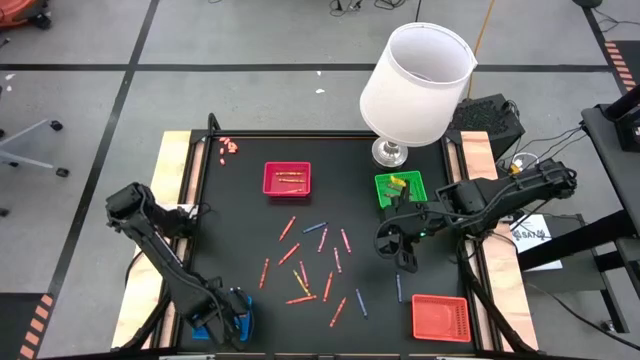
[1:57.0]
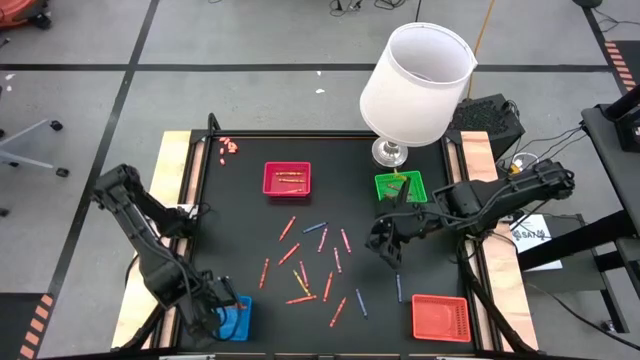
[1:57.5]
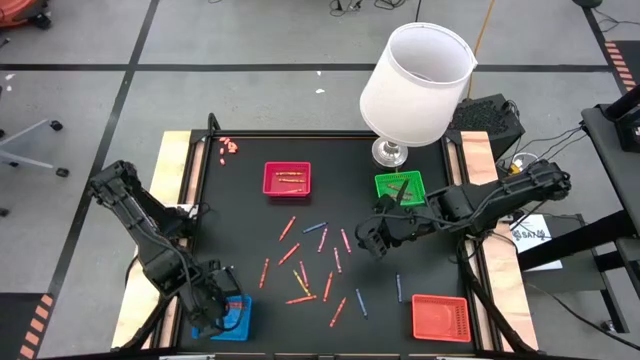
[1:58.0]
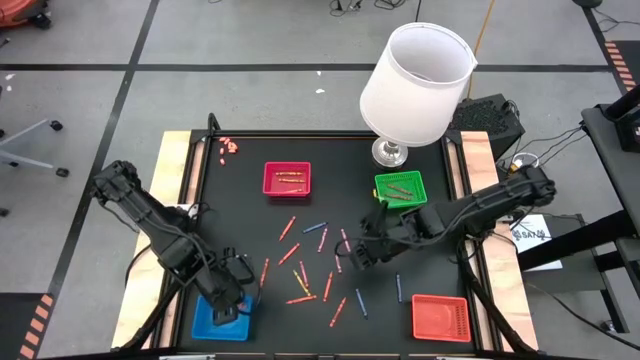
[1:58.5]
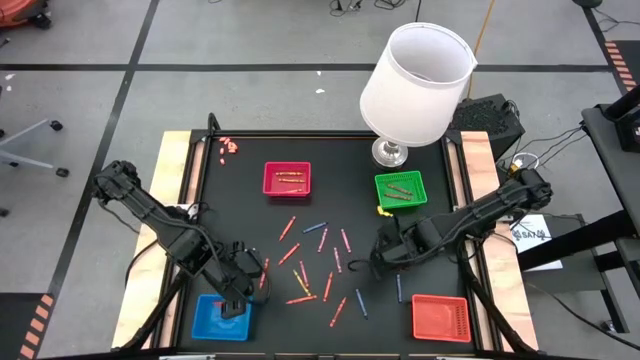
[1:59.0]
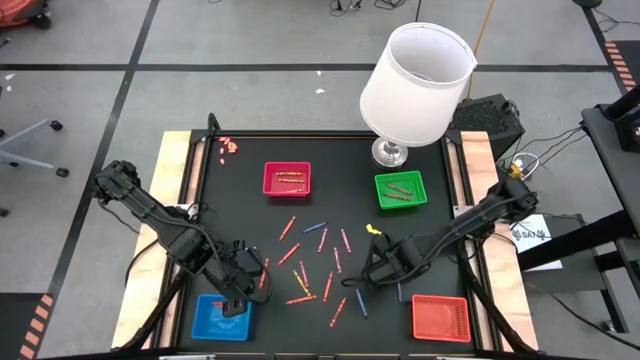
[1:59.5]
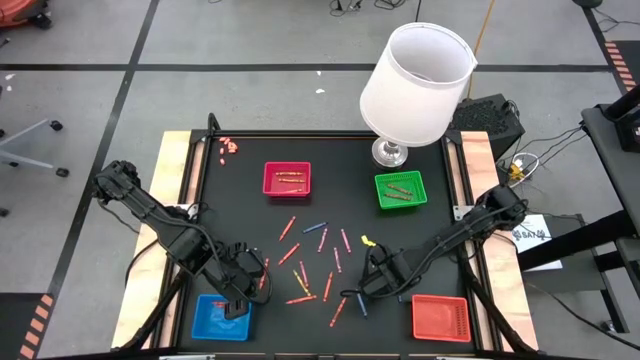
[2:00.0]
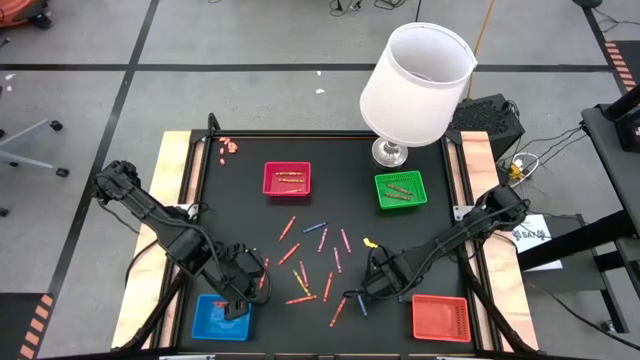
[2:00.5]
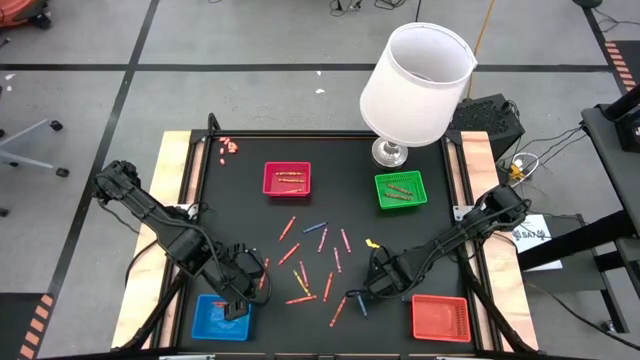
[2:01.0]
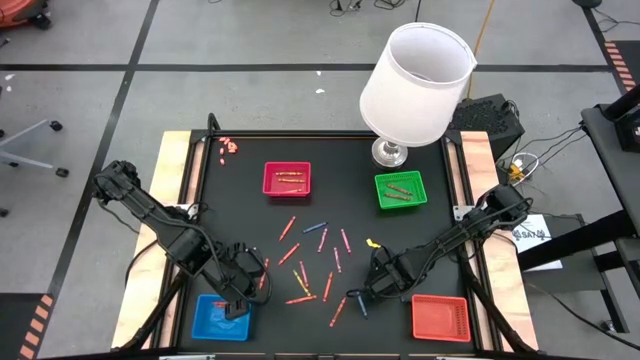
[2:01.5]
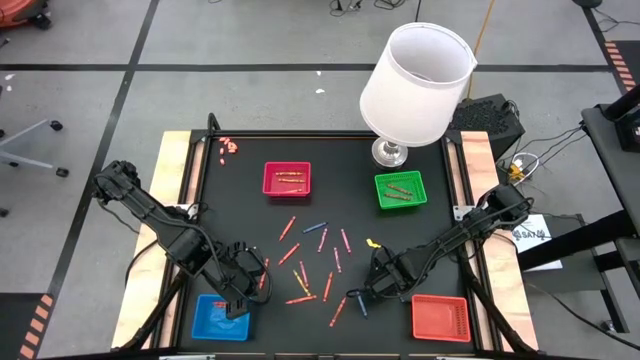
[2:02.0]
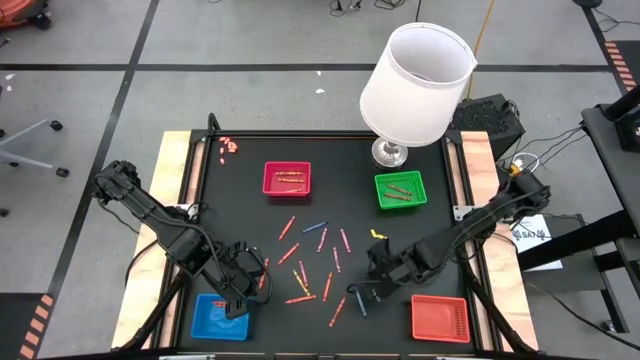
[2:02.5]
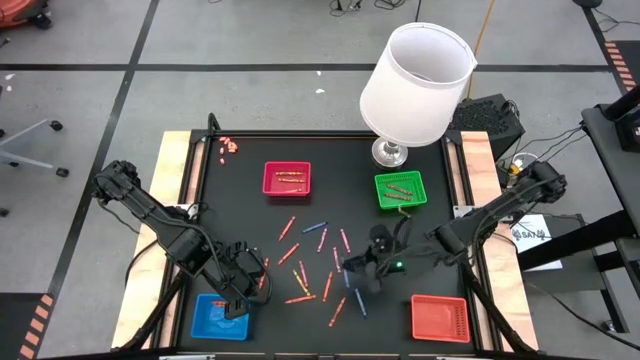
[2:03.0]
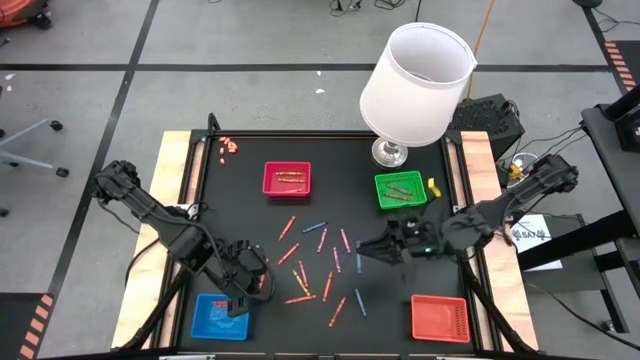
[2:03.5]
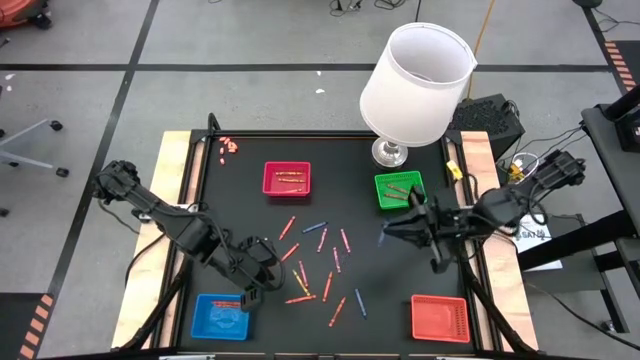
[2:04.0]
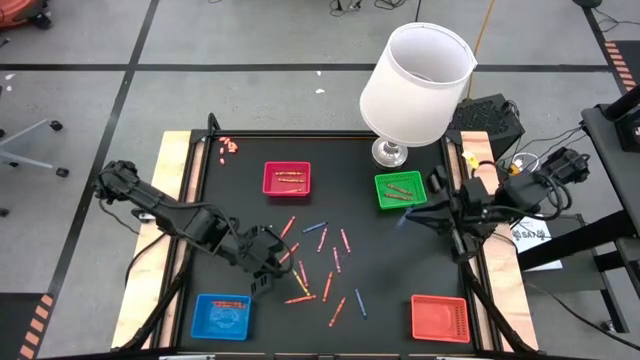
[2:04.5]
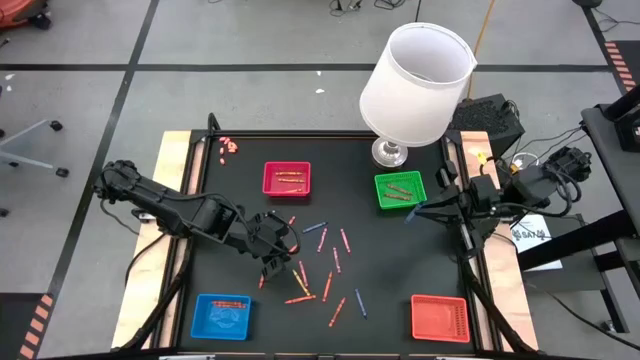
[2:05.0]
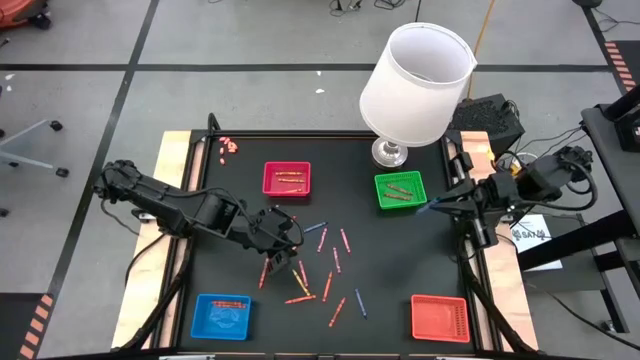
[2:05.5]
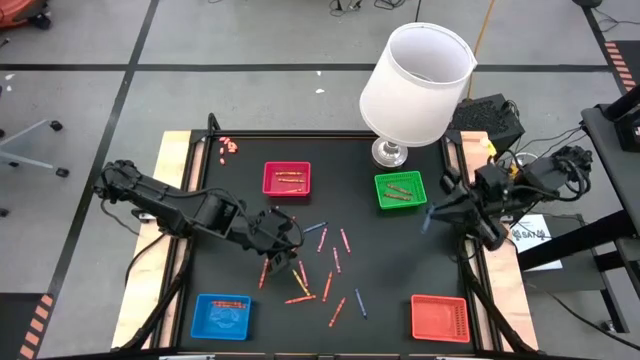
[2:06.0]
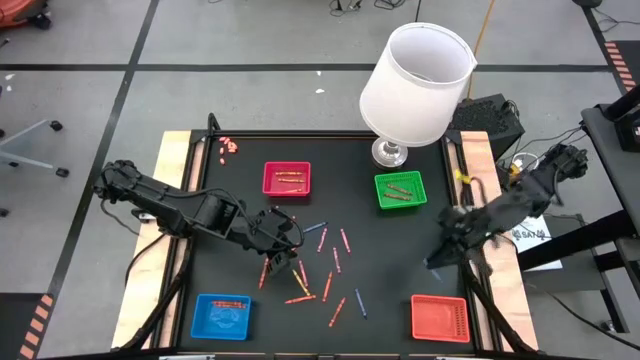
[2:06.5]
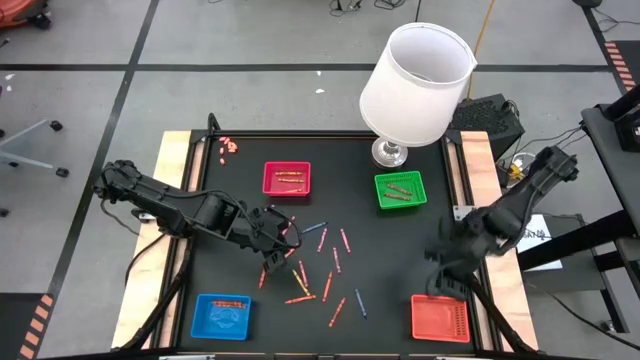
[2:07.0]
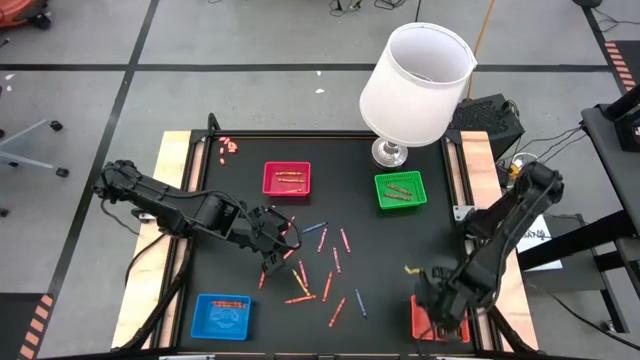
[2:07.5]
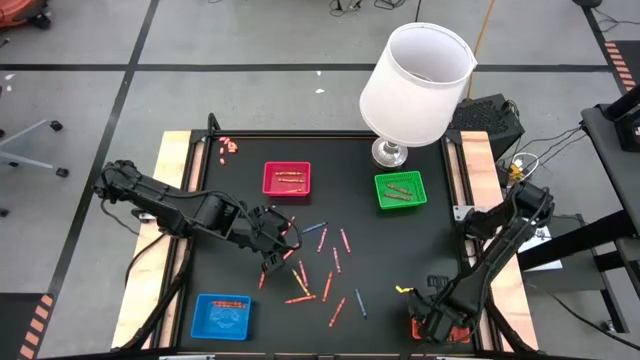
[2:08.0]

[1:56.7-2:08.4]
Task: Sort crayons
Put the blue crayon into the orange basket

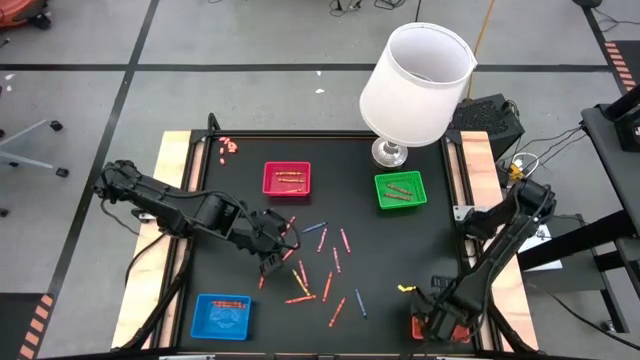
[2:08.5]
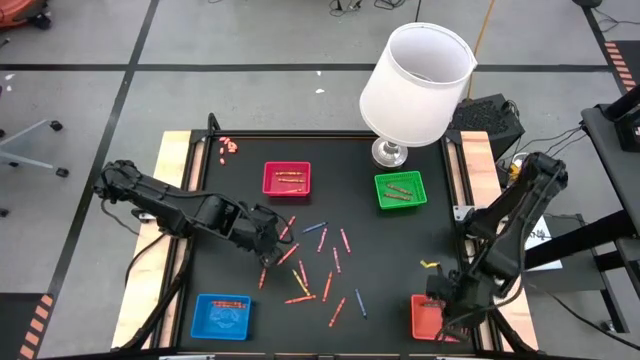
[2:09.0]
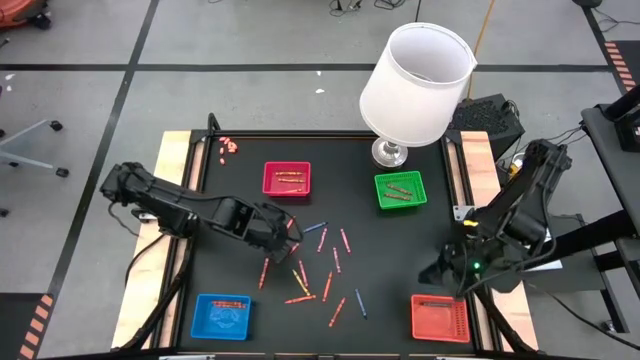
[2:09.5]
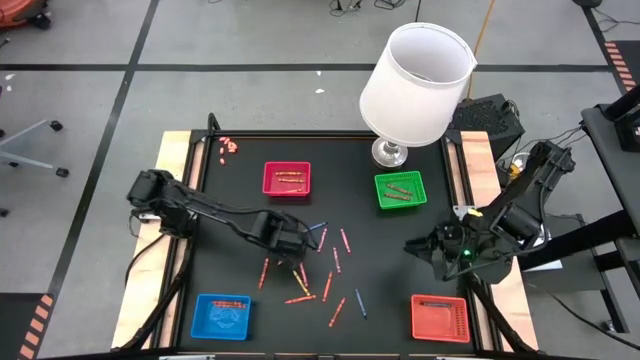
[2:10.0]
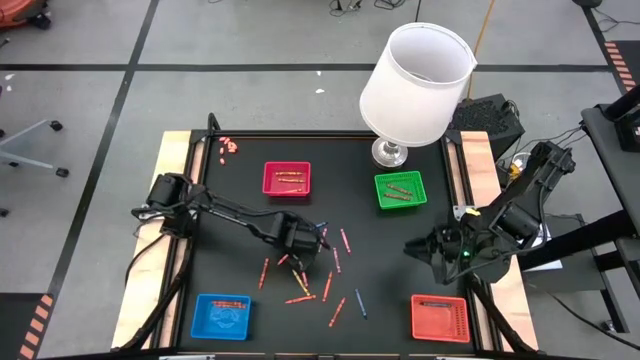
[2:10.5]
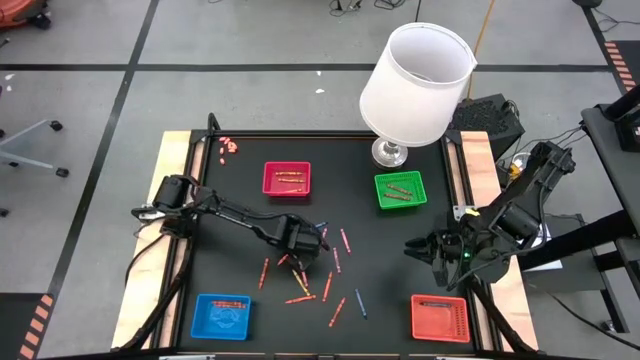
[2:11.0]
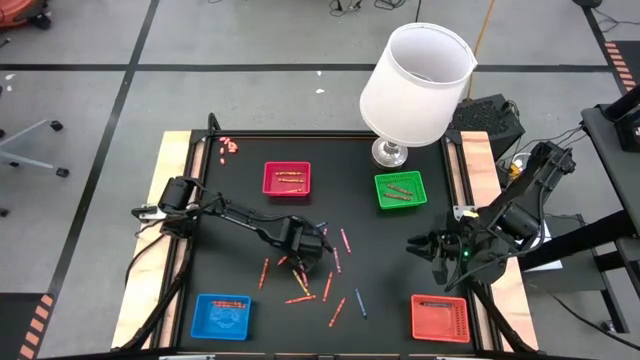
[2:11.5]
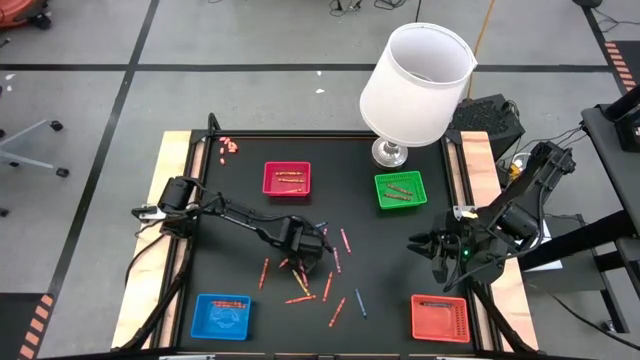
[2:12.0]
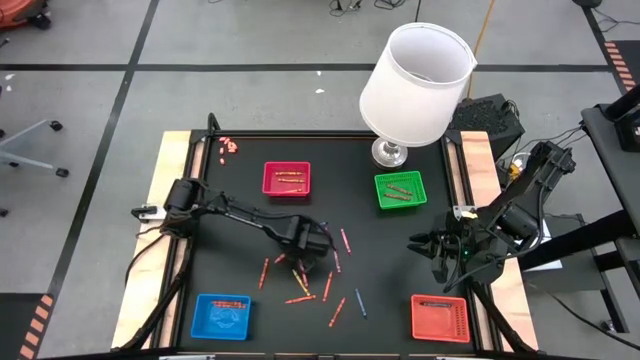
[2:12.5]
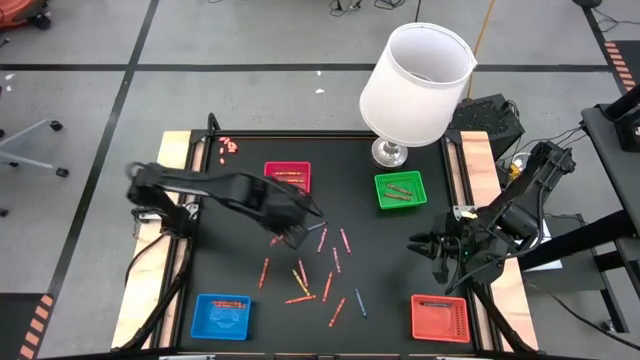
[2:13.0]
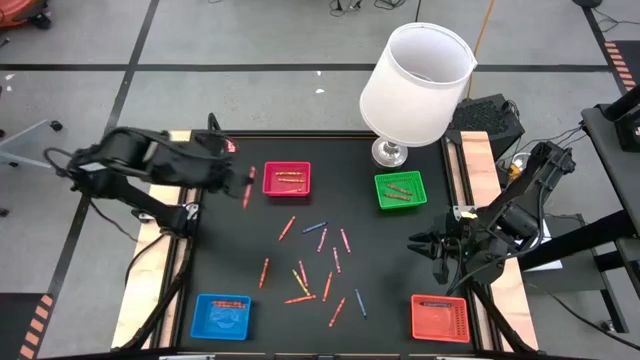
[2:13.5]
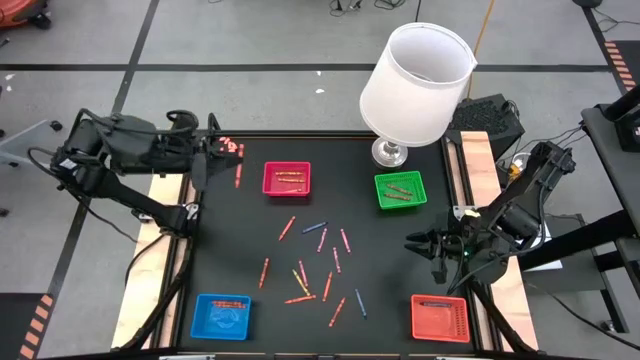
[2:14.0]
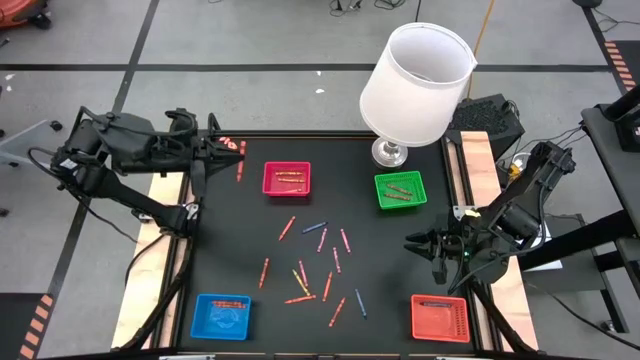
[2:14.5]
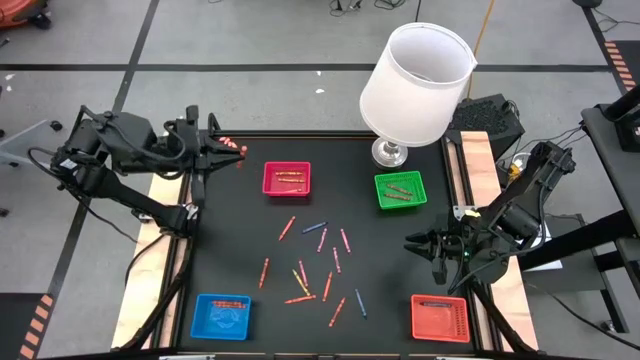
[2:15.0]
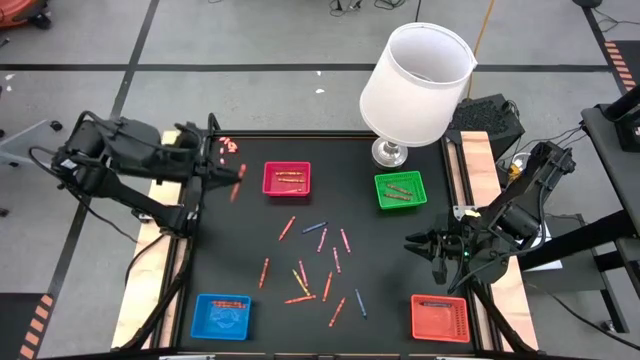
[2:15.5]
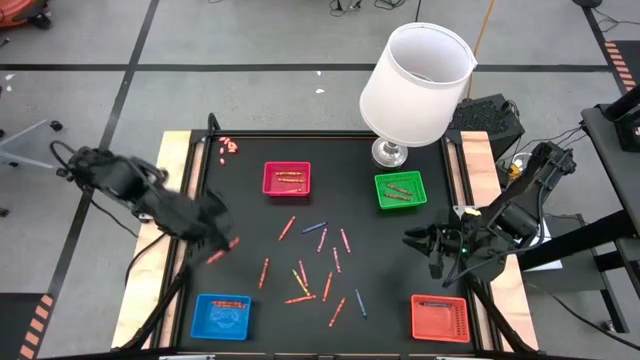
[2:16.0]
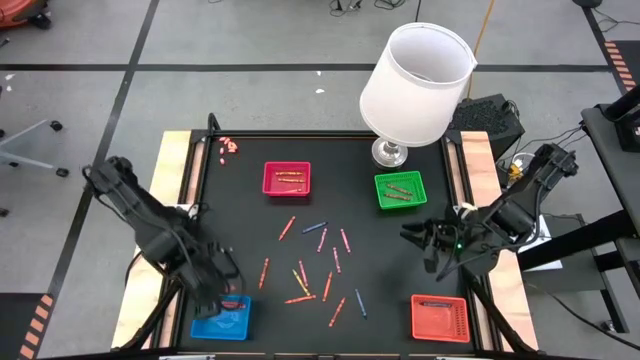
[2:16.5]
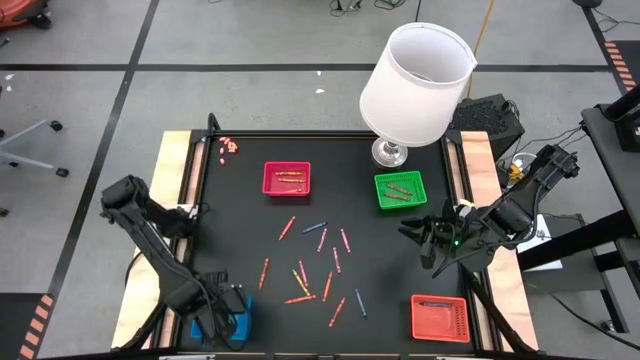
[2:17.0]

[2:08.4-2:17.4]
Put the orange crayon into the blue basket
